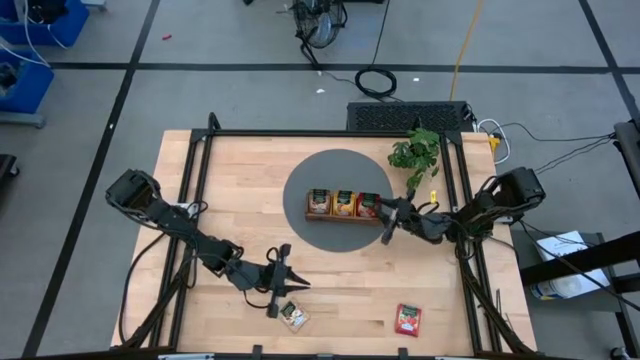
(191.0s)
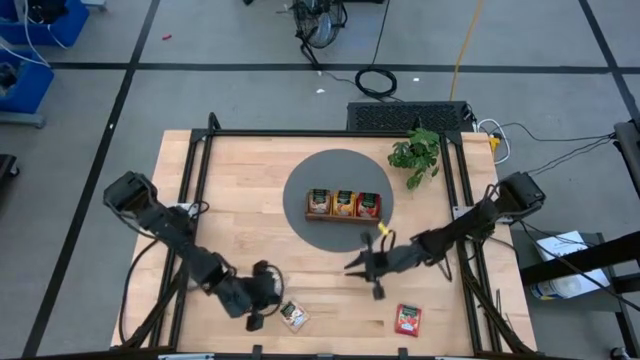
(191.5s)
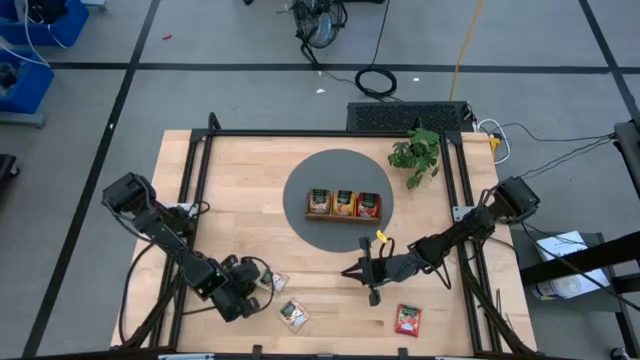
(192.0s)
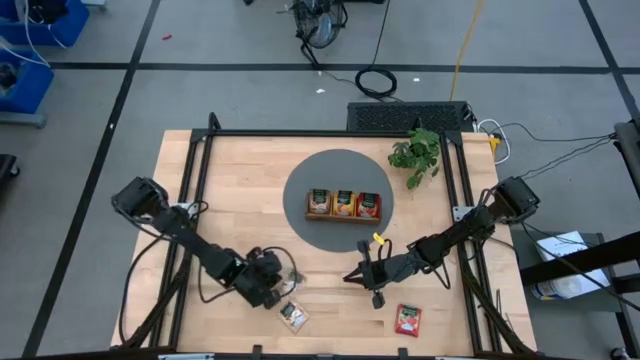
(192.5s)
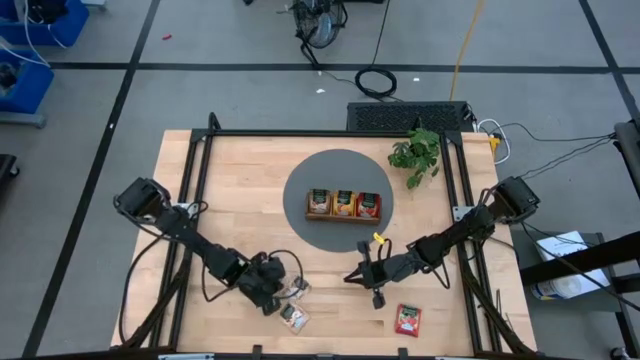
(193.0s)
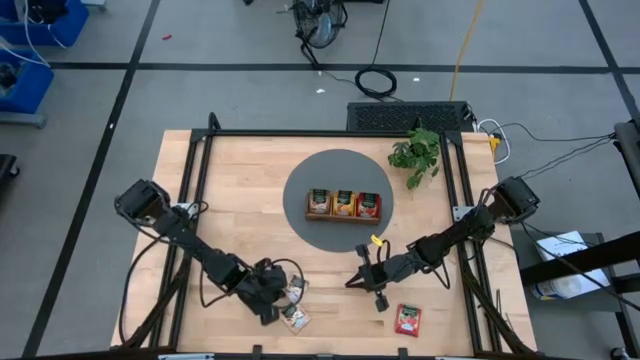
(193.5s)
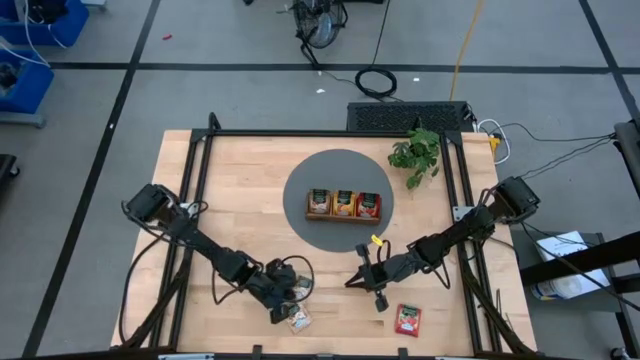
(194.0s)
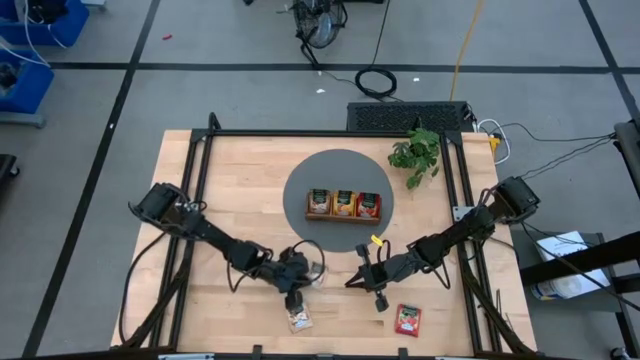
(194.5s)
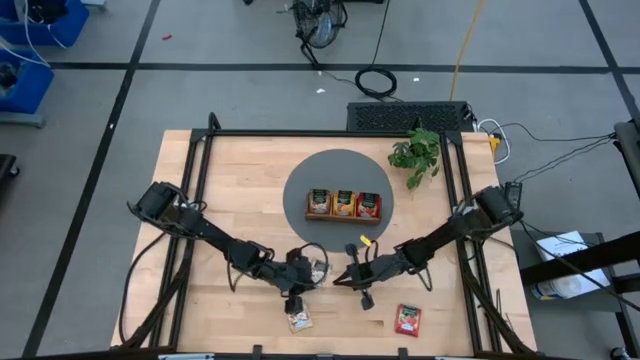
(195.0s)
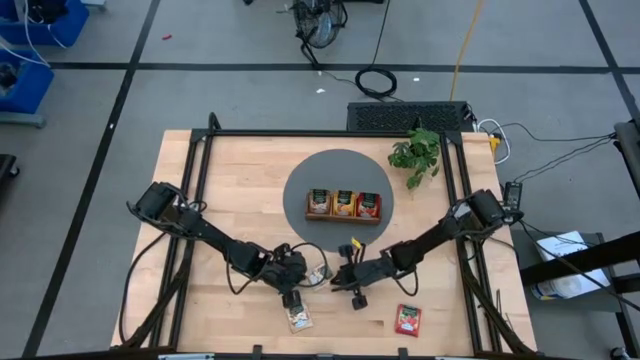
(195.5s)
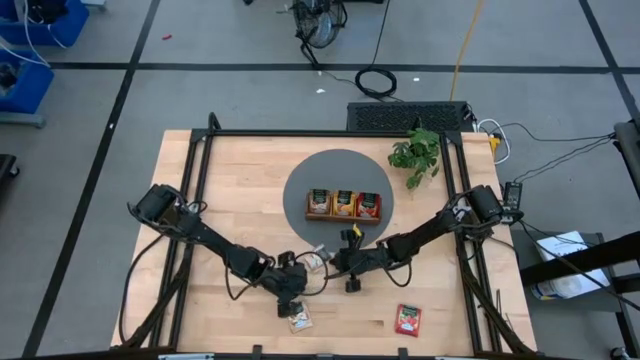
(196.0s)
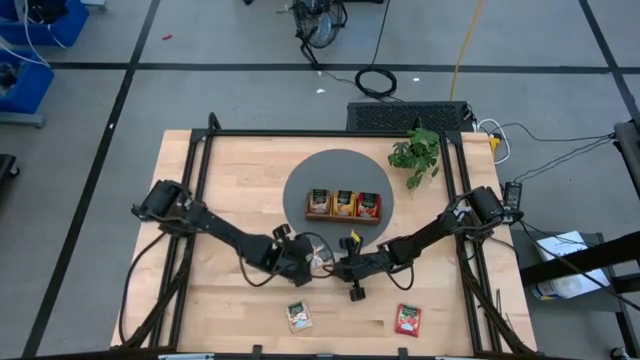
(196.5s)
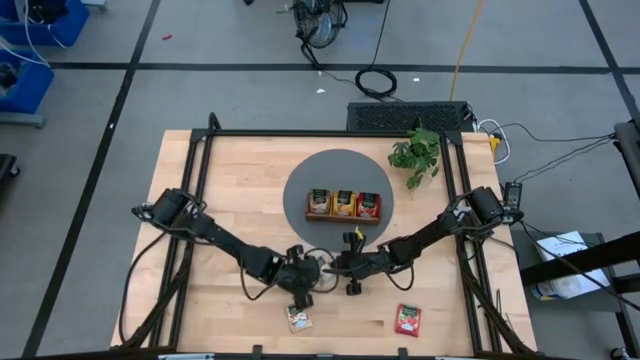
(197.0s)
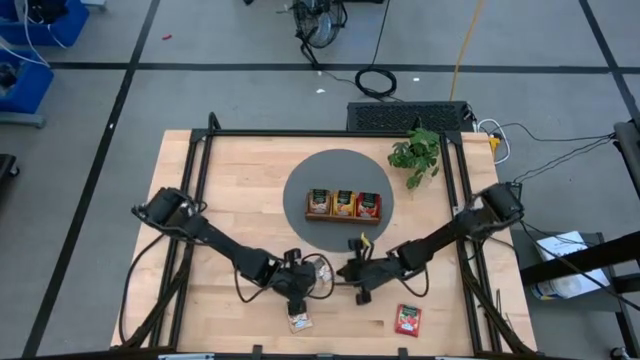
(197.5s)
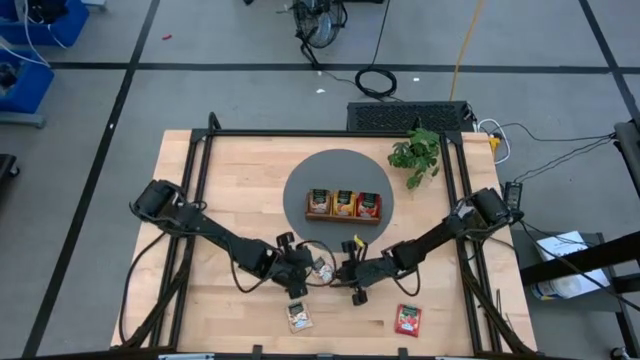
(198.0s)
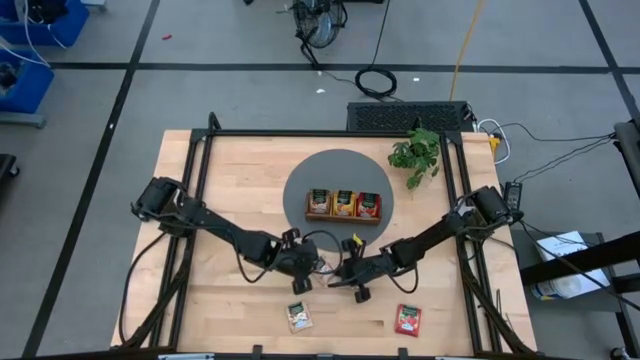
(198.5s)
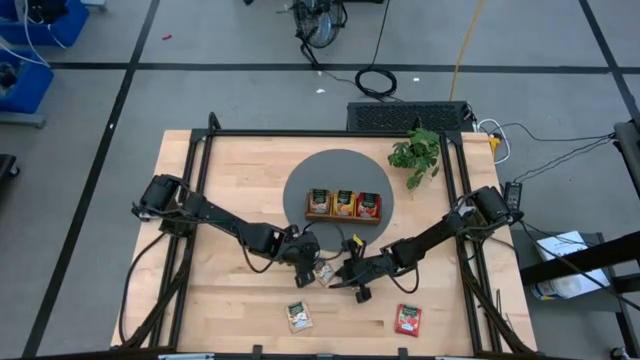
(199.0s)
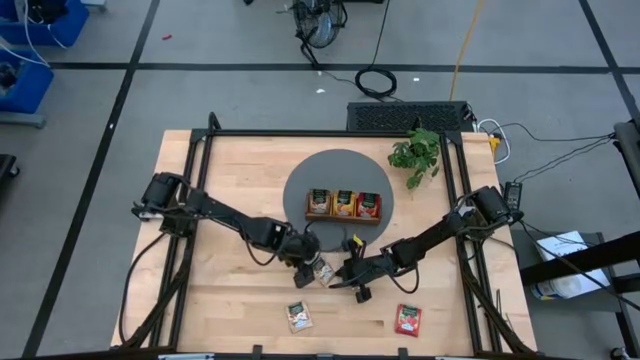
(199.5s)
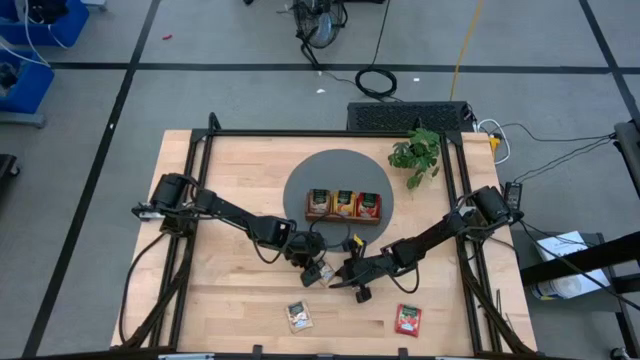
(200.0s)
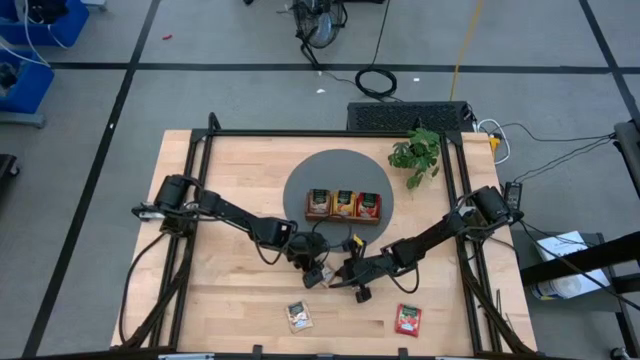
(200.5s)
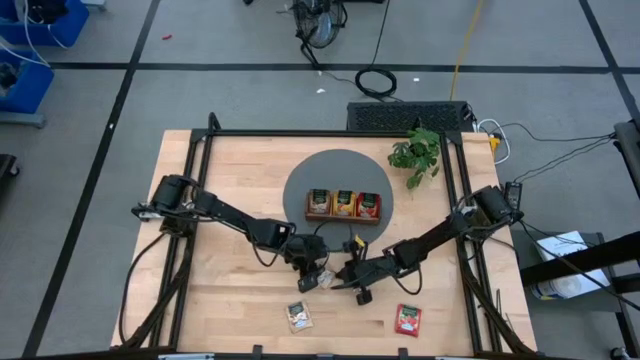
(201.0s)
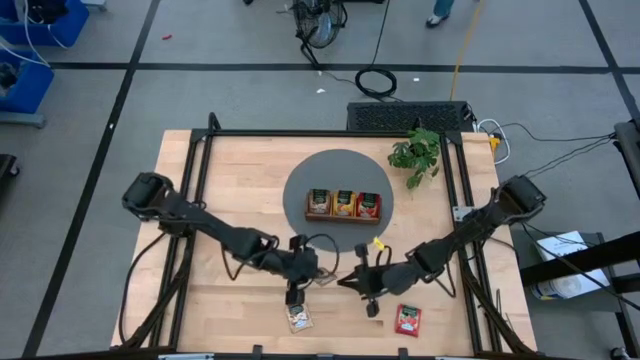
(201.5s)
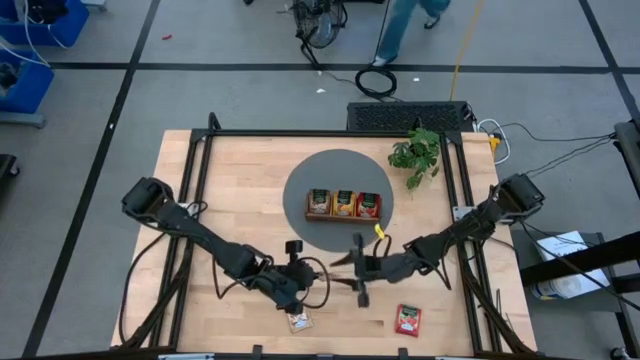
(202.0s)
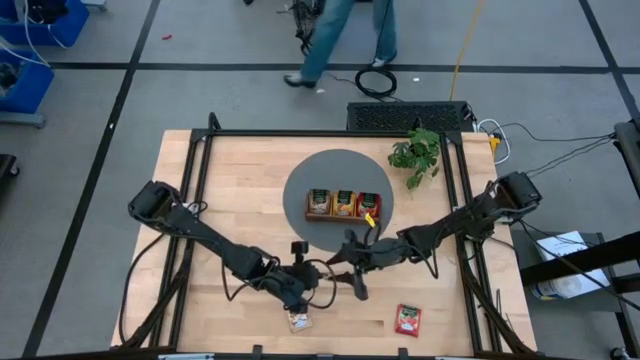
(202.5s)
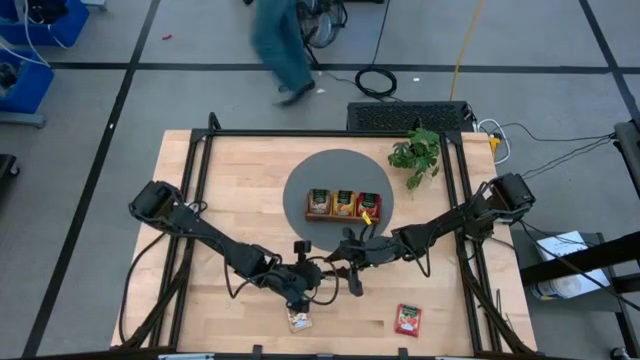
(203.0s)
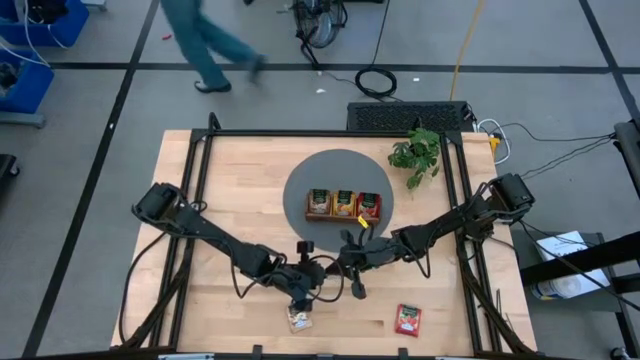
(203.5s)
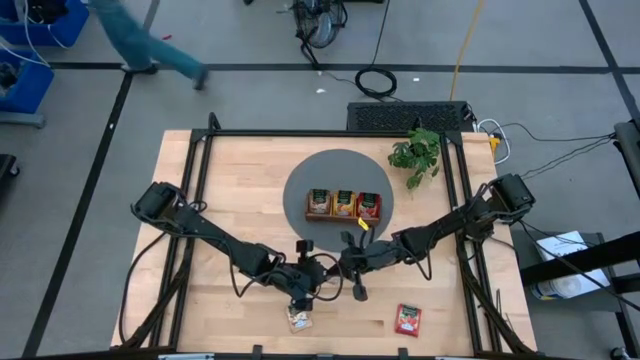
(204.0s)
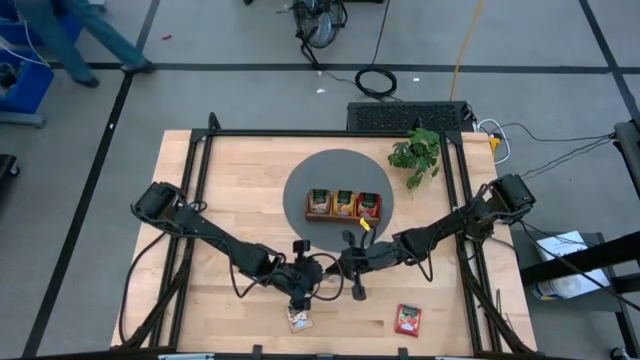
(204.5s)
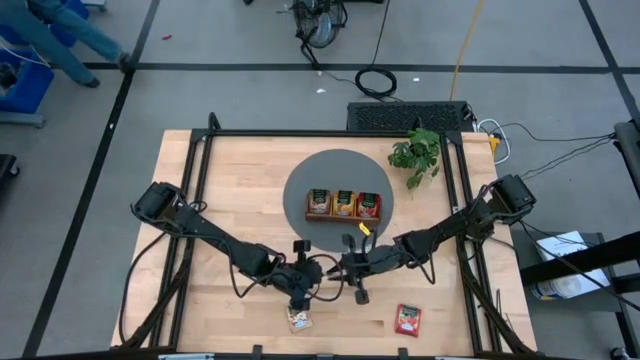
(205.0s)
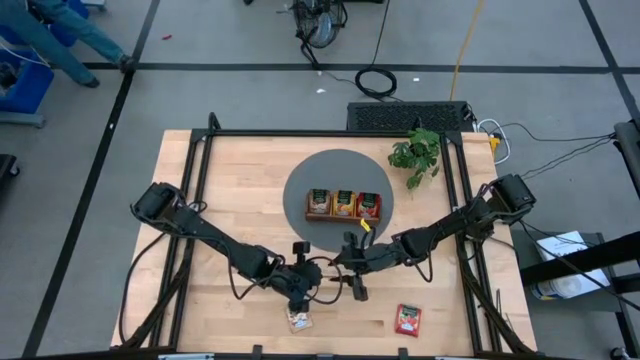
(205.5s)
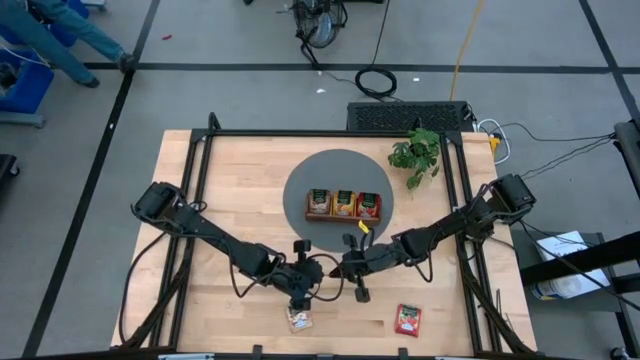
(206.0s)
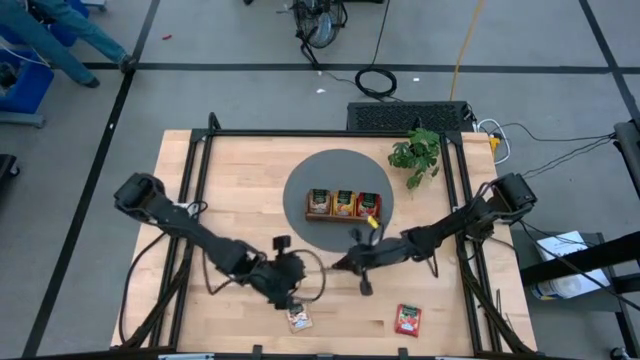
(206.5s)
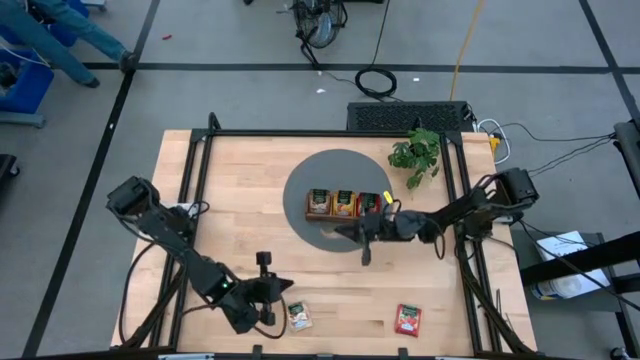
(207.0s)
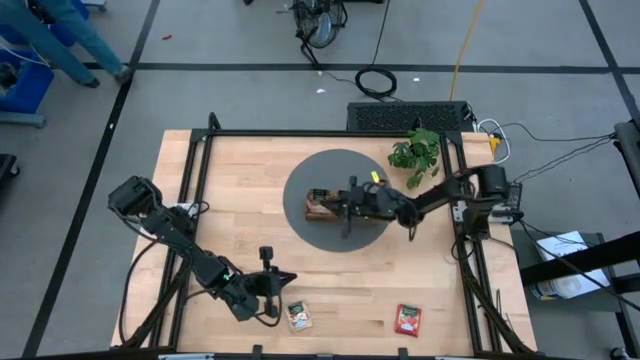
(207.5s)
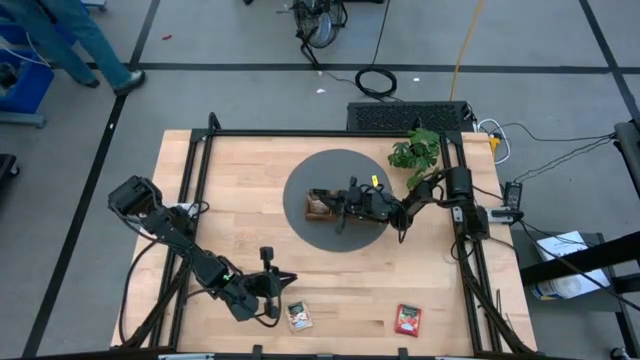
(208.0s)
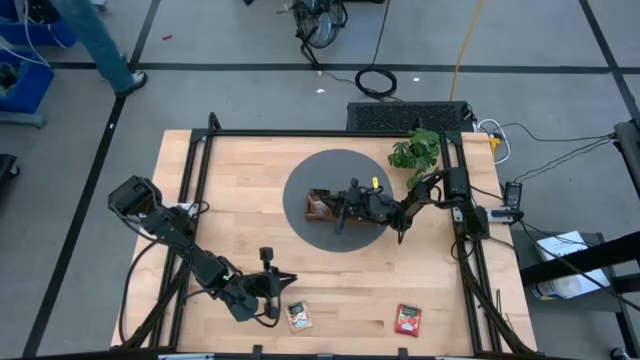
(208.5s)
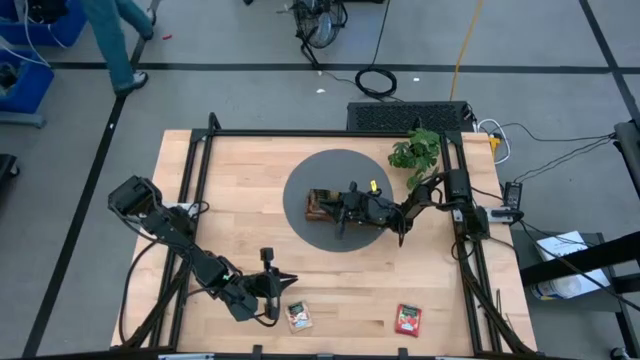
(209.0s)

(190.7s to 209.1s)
Task: Pick & Place Tea
Put the top brown tea bag into the left slot of the wooden organizer

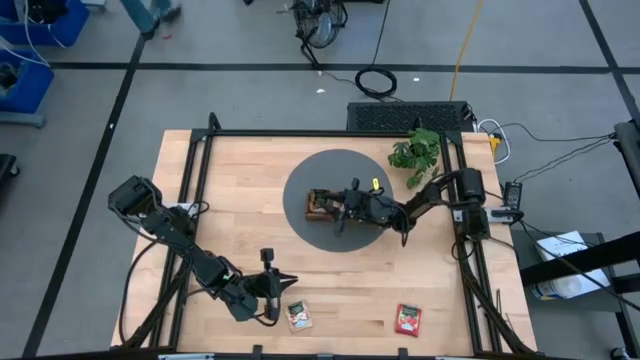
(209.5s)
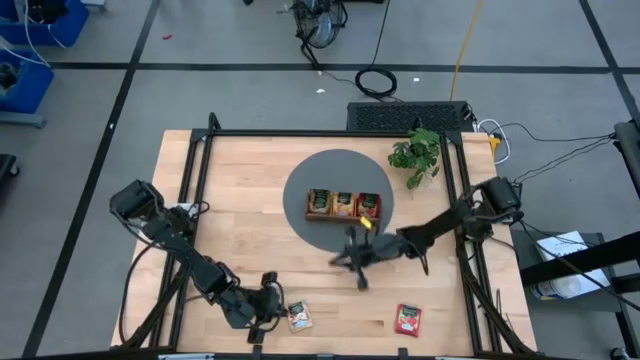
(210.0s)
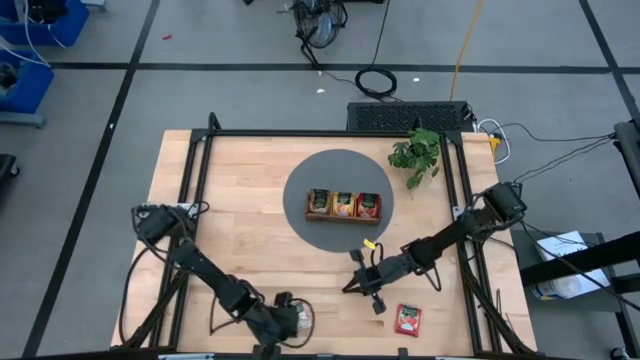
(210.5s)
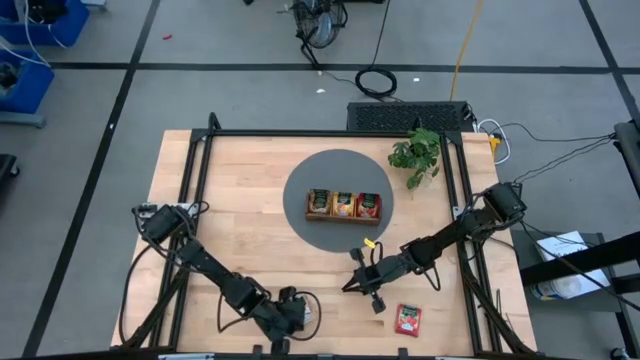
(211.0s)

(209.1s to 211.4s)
Adjust the brown tea bag on the table

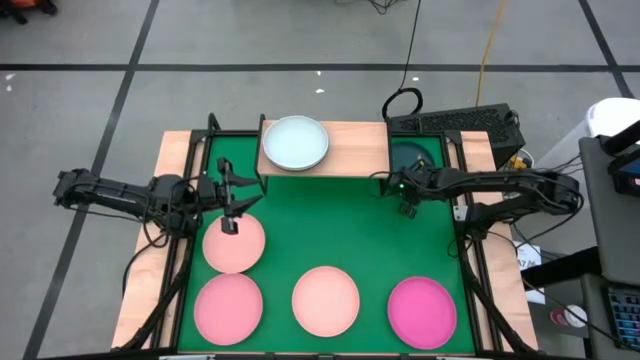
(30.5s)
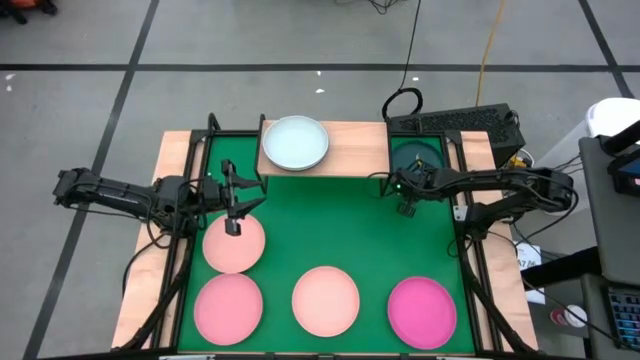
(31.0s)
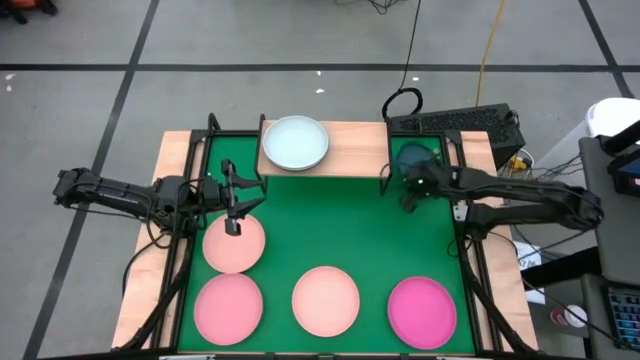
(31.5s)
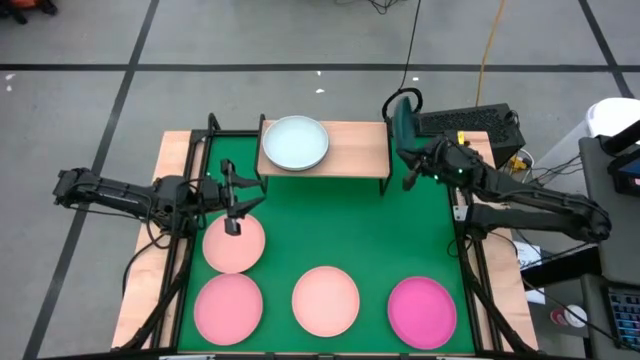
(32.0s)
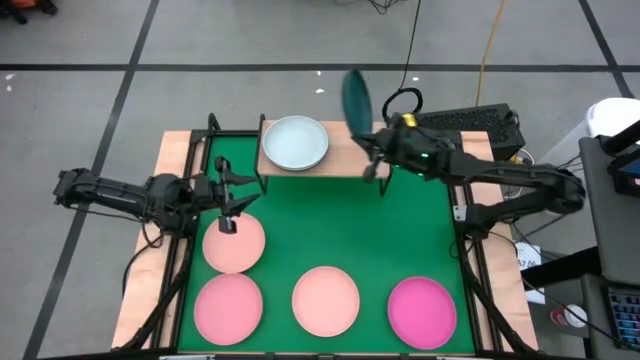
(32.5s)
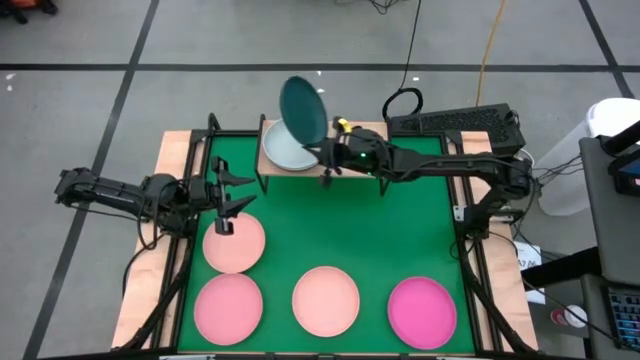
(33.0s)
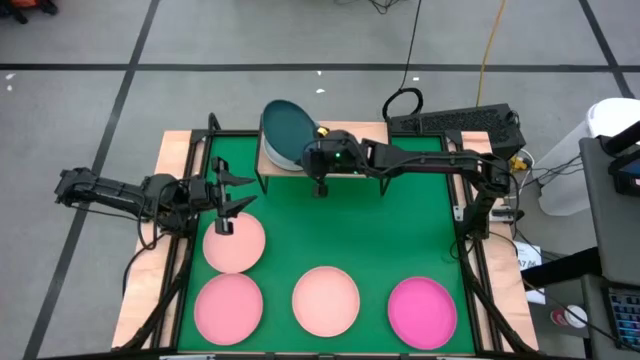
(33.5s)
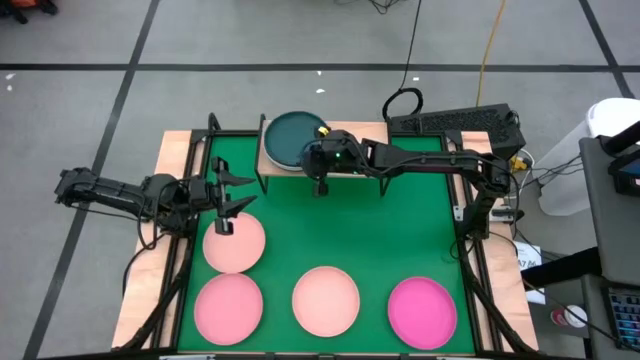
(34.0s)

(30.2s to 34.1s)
Task: Place and stack plates onto a shelf
Stack the black plate on top of the white plate on the shelf
